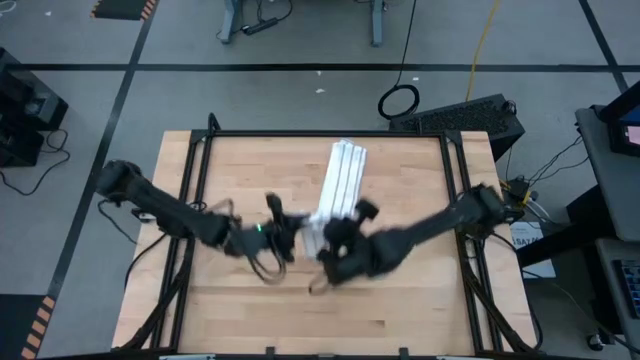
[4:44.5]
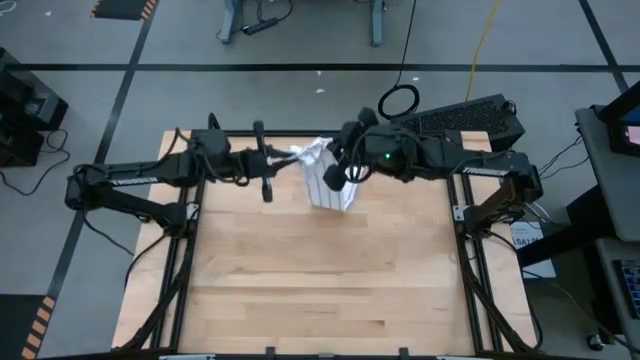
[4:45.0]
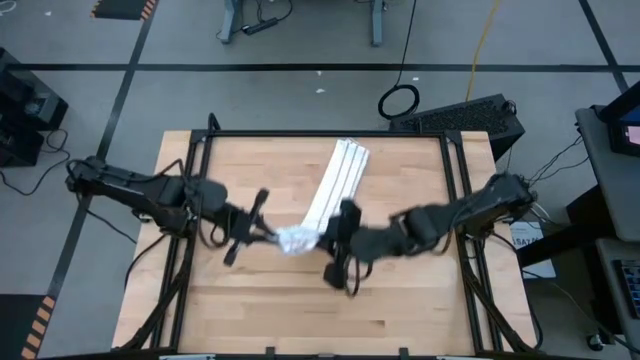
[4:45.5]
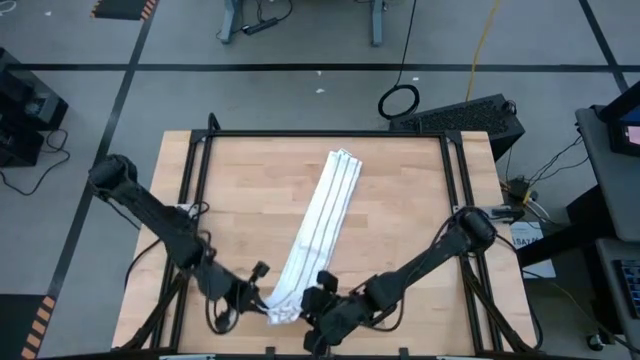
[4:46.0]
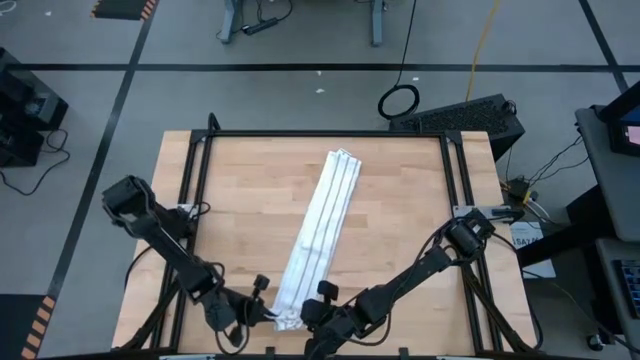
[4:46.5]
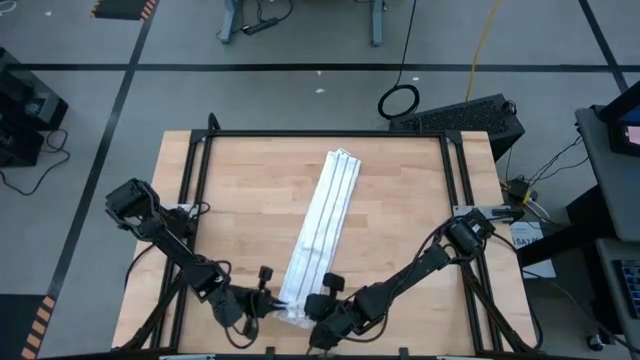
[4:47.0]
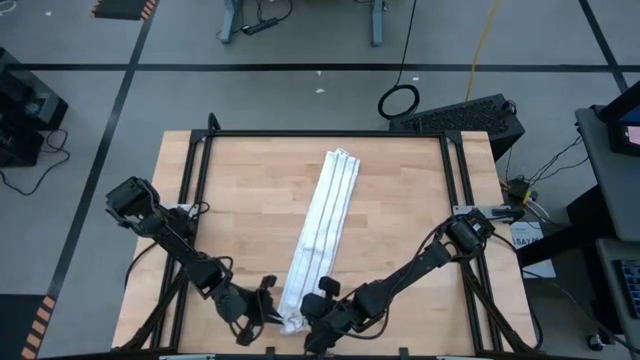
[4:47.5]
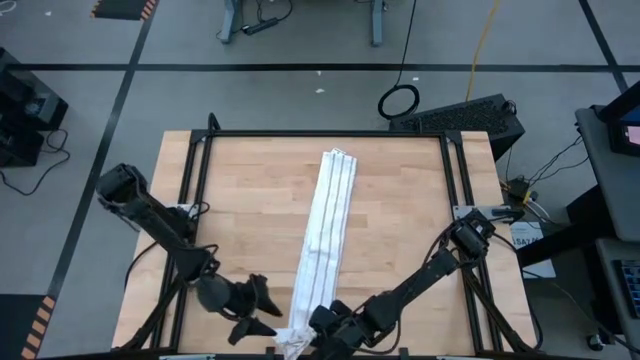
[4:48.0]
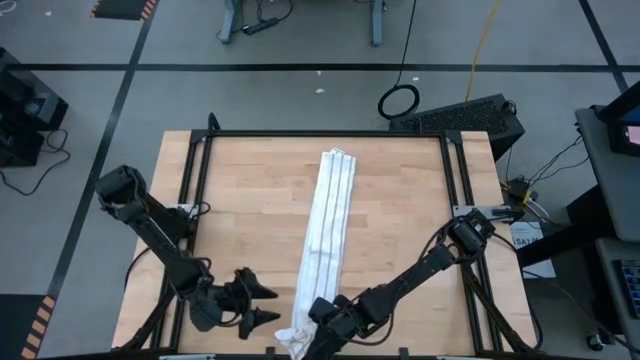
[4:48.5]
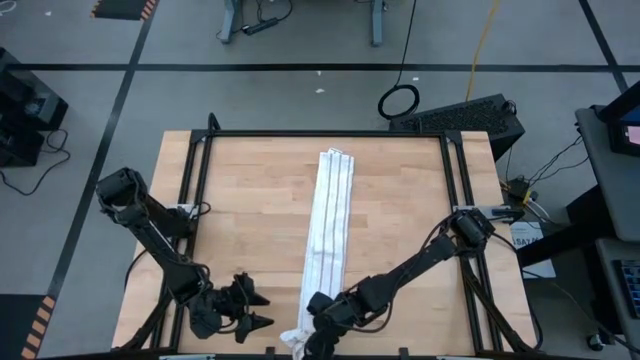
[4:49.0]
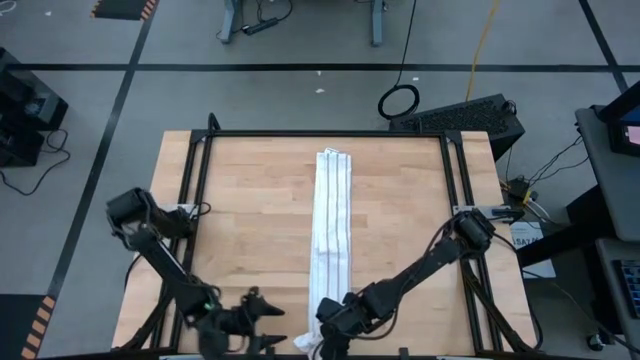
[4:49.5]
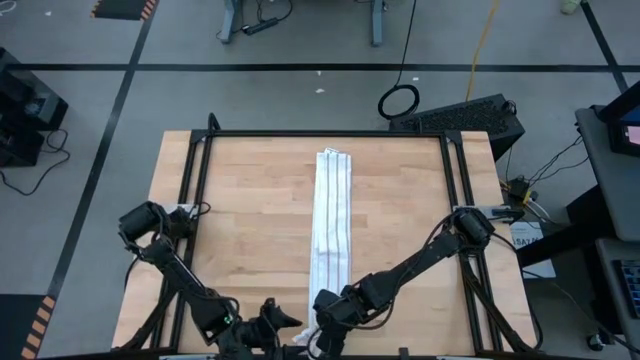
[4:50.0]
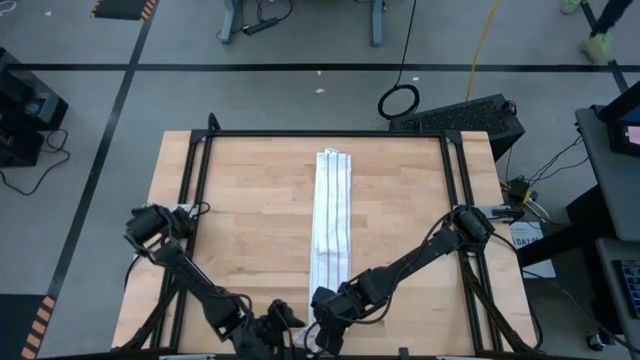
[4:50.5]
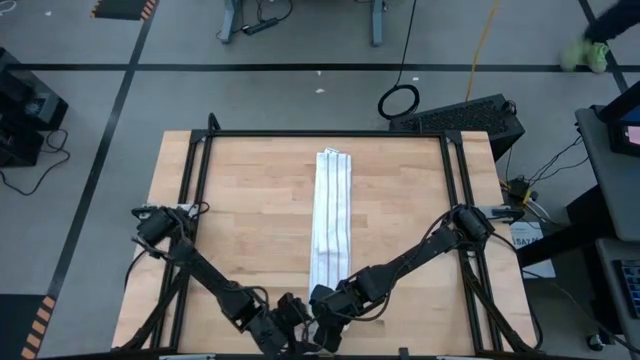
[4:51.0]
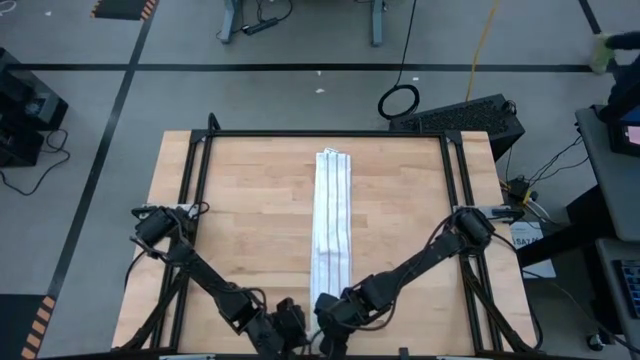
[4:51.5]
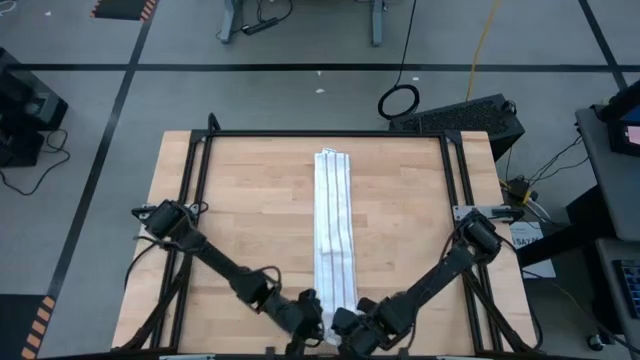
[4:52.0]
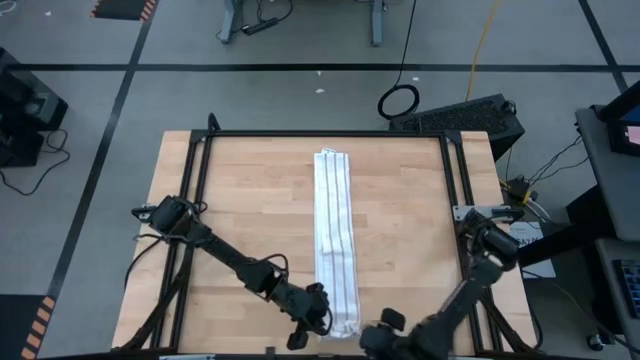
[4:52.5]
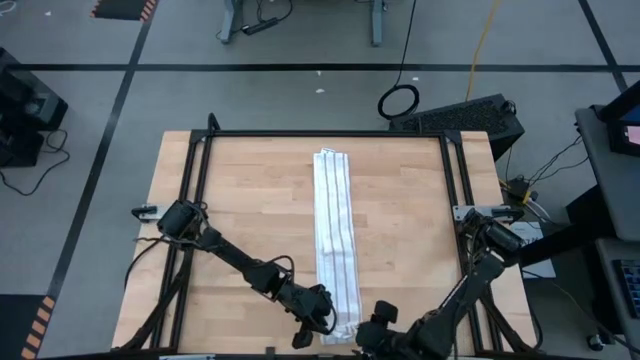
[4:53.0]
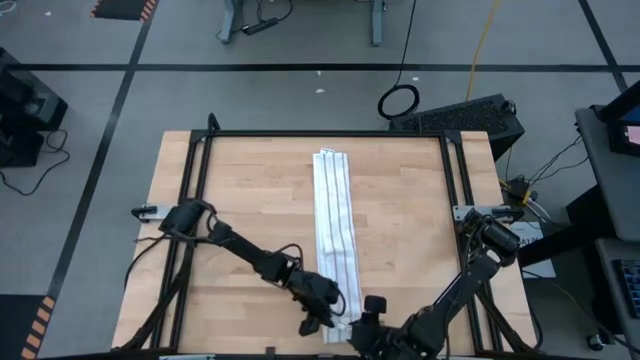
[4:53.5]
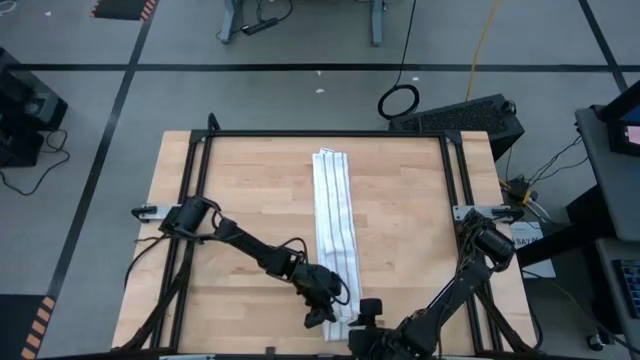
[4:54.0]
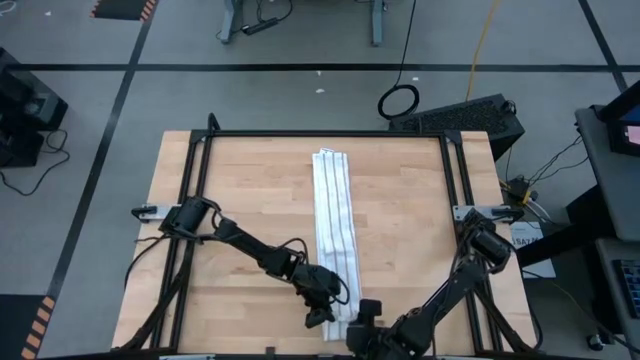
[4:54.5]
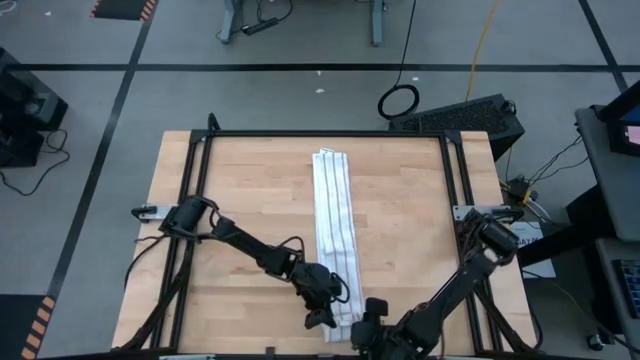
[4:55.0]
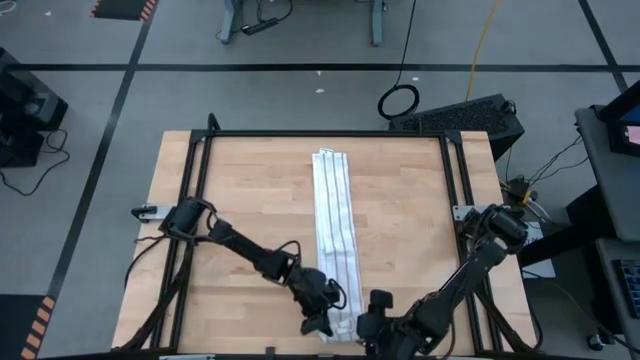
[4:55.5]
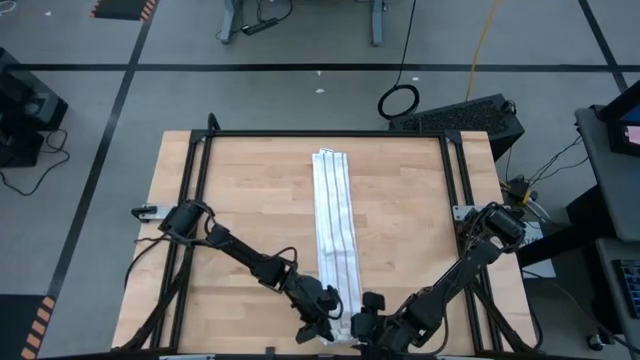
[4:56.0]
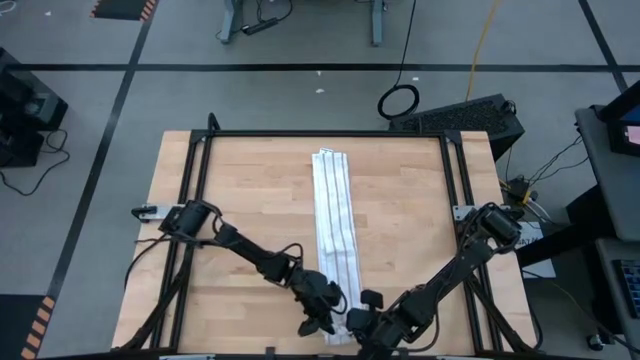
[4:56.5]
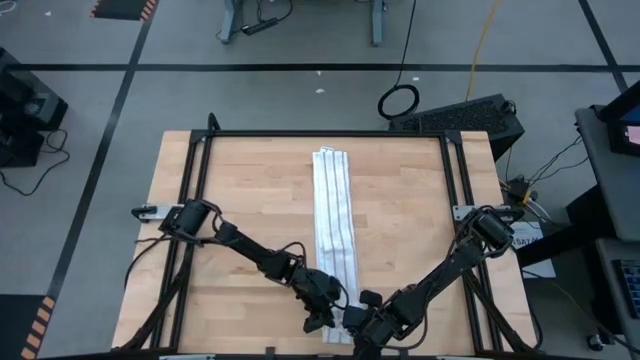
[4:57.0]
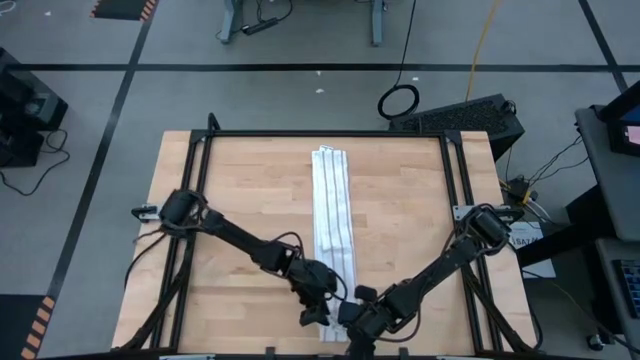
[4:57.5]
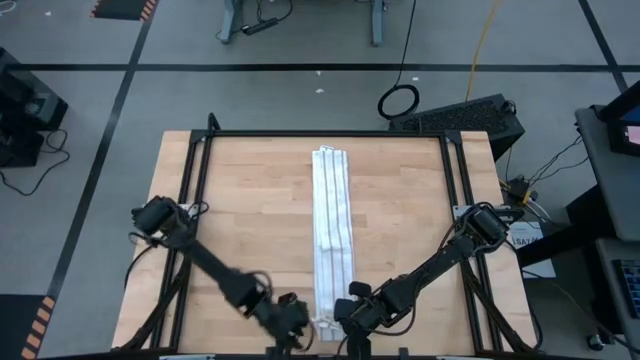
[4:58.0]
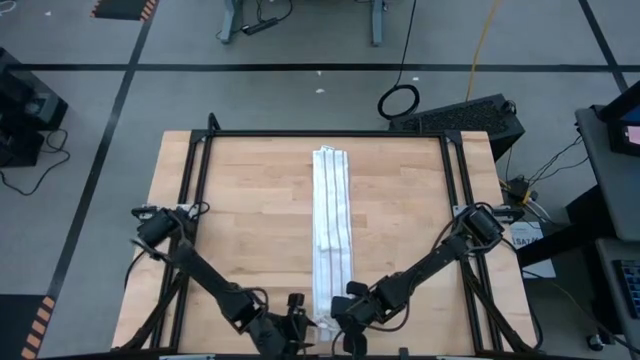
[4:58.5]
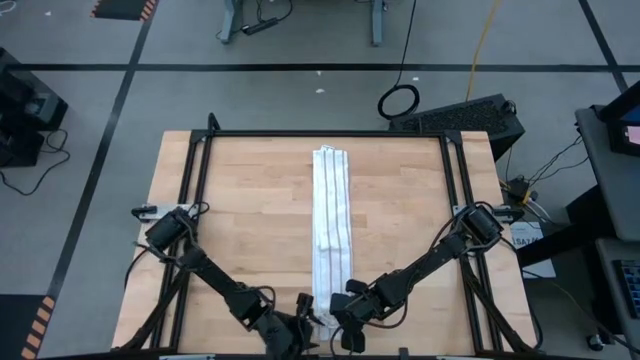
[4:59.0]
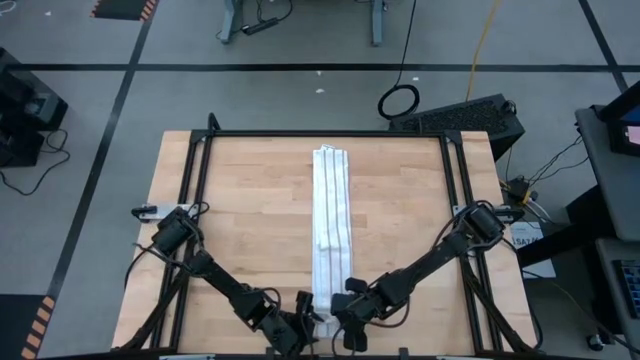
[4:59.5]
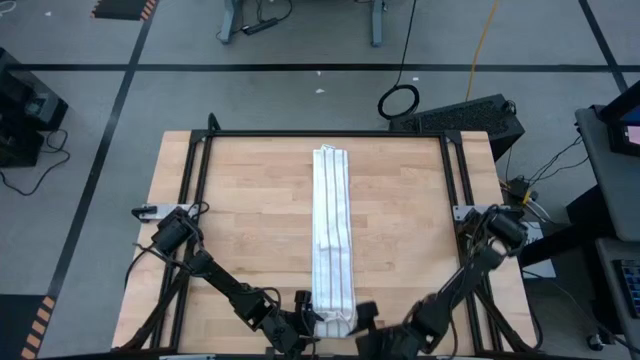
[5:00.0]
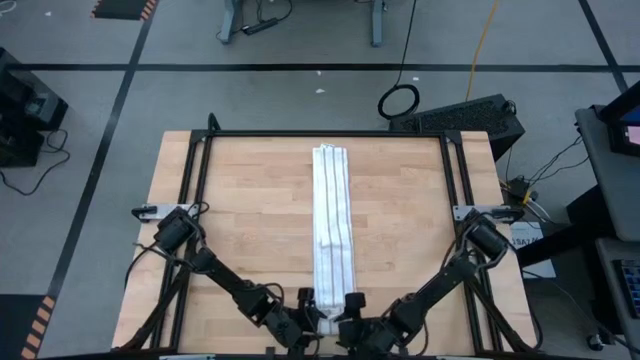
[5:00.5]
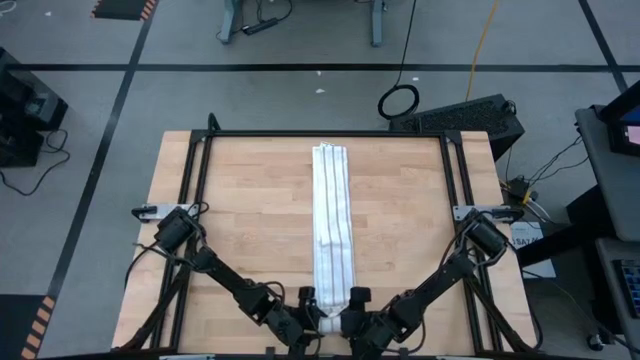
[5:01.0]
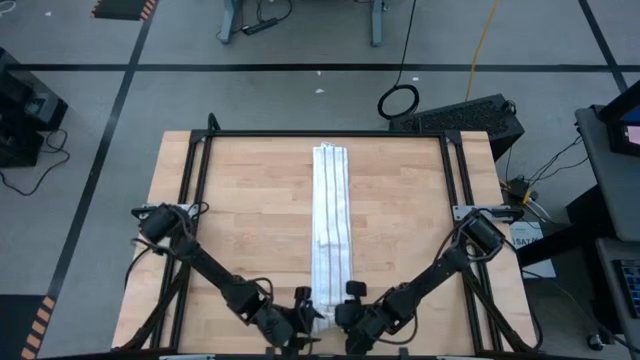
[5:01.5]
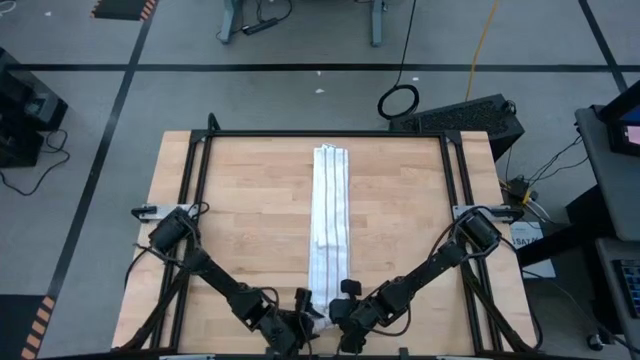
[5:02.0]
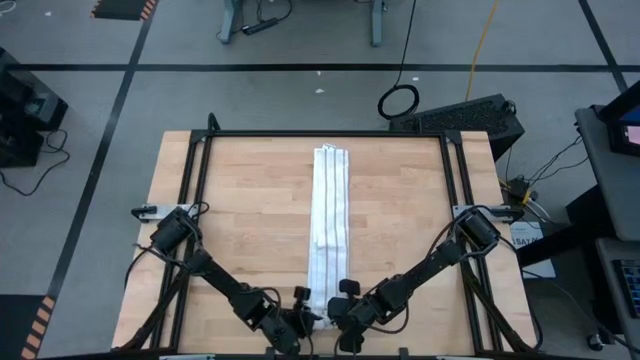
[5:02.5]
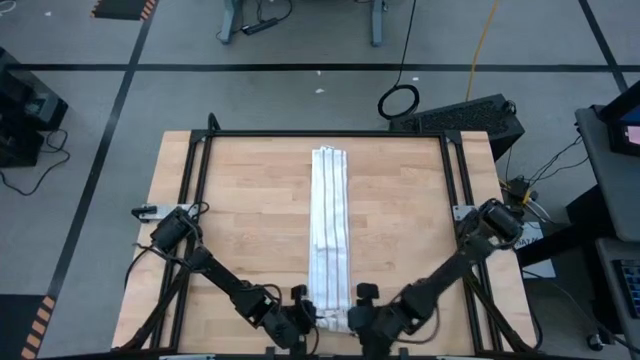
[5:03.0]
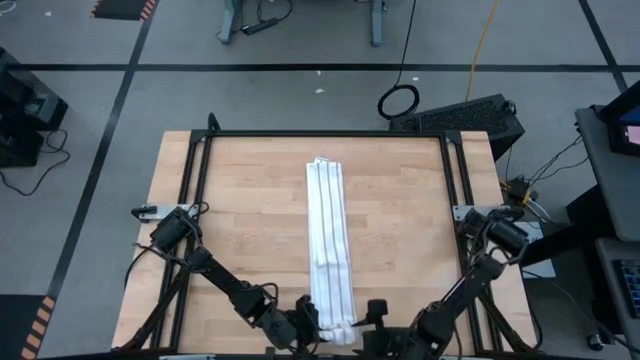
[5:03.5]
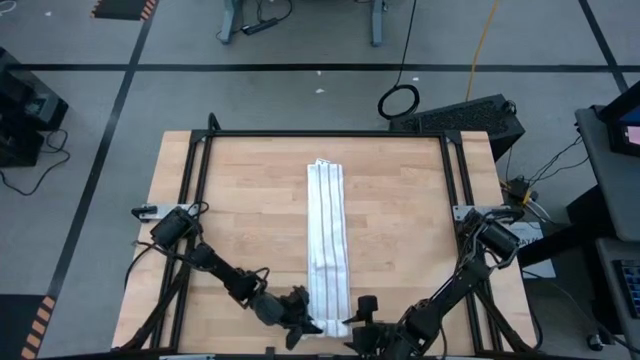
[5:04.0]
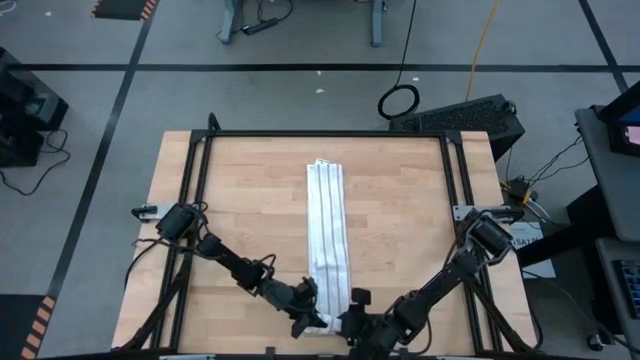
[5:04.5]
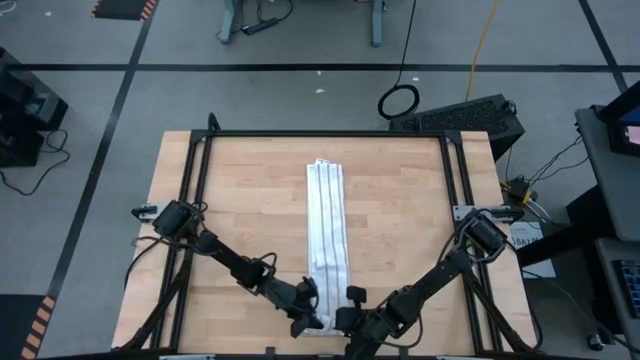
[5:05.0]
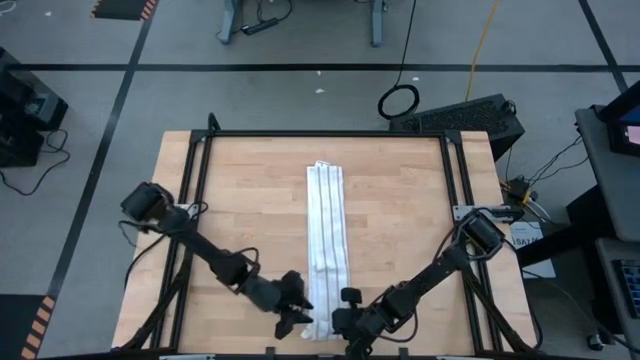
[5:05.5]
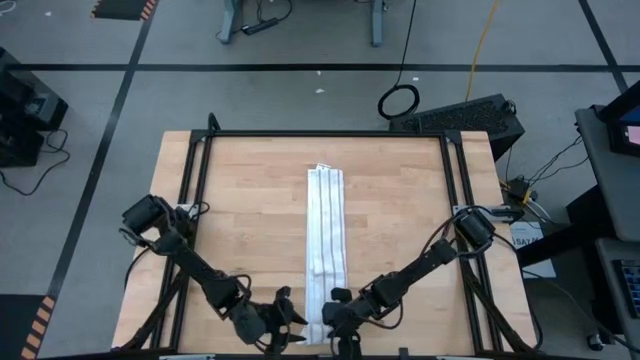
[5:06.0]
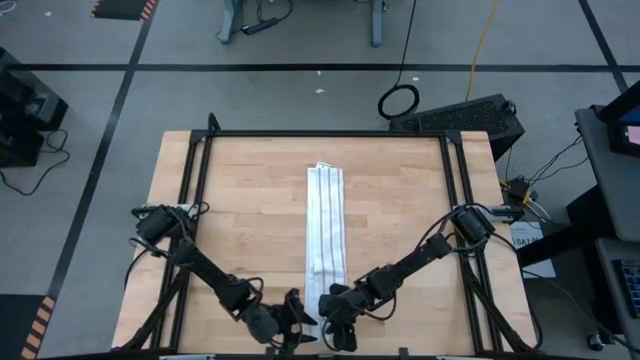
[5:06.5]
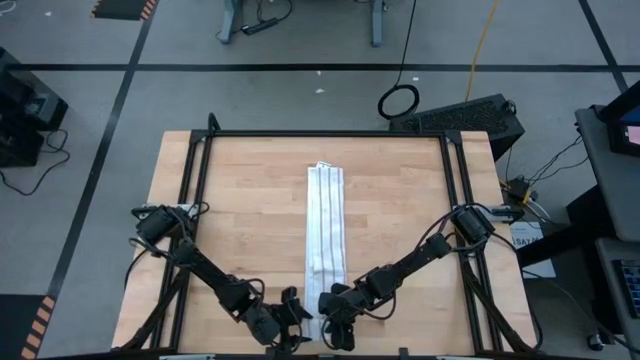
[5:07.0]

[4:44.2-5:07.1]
Task: Roll towel into tight, uniform cylinder
Roll the white brown kitchen towel
